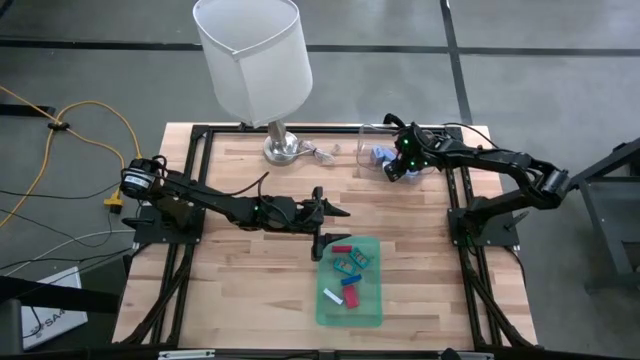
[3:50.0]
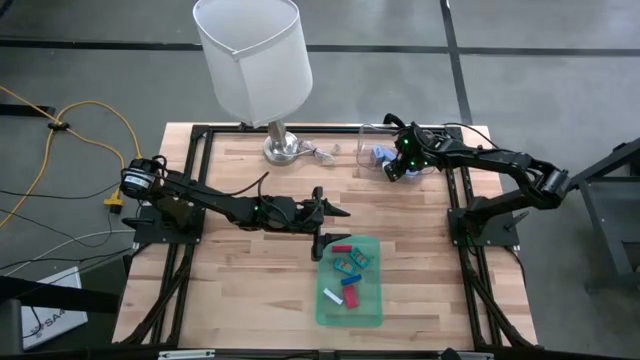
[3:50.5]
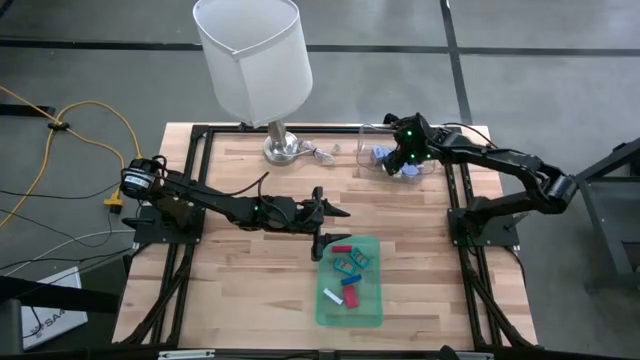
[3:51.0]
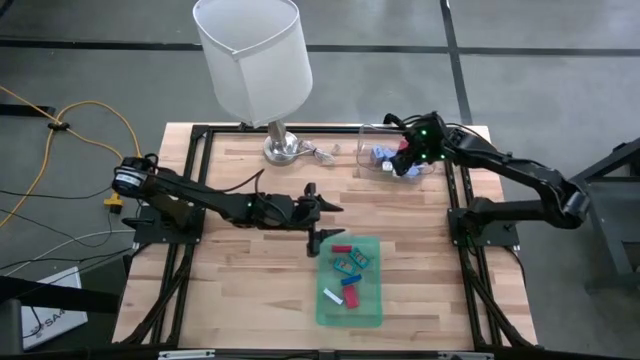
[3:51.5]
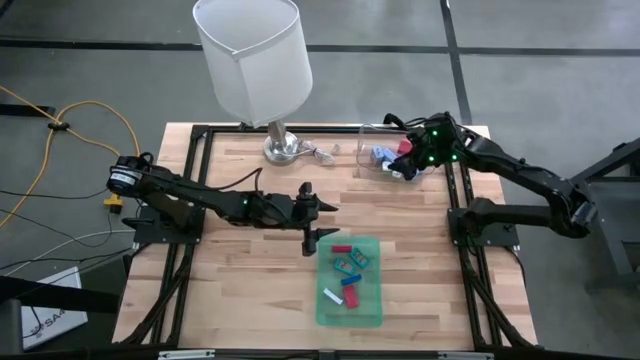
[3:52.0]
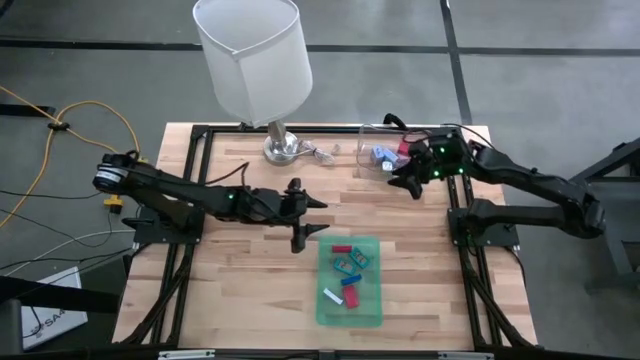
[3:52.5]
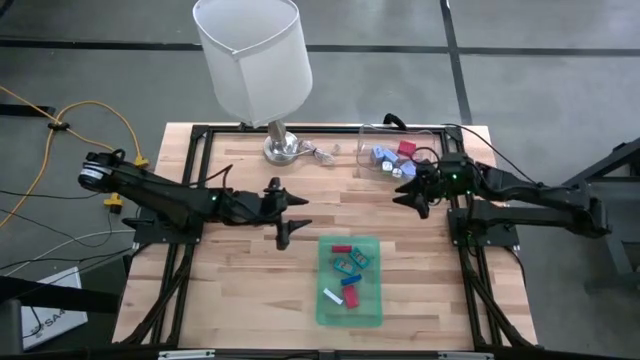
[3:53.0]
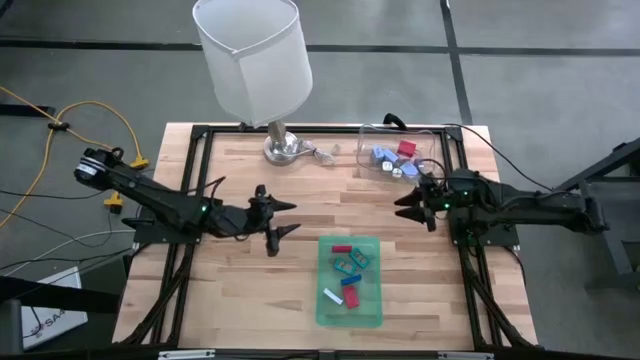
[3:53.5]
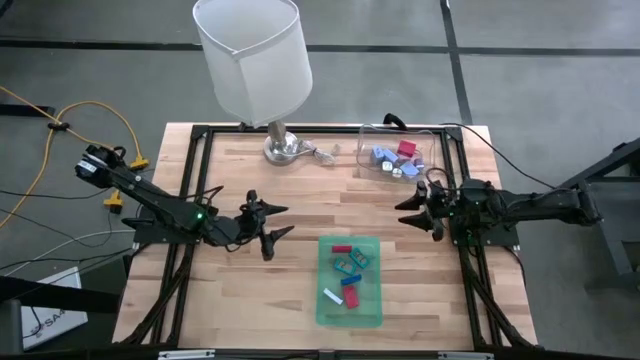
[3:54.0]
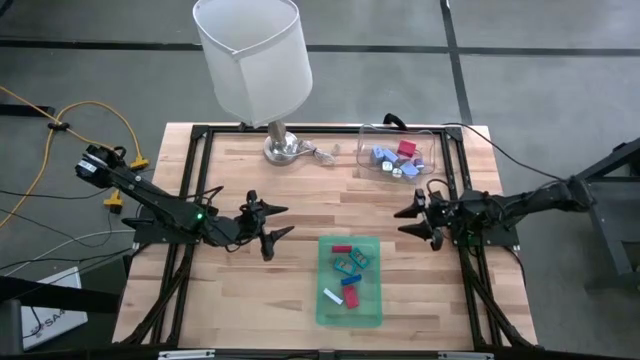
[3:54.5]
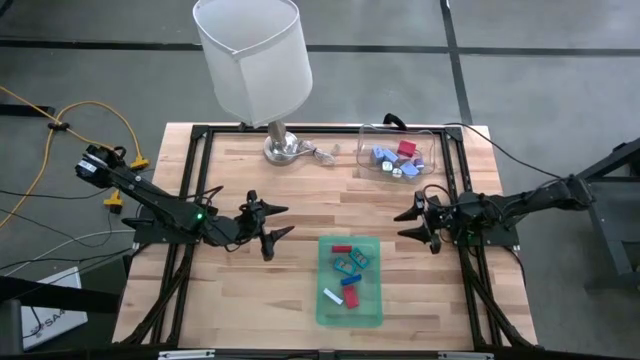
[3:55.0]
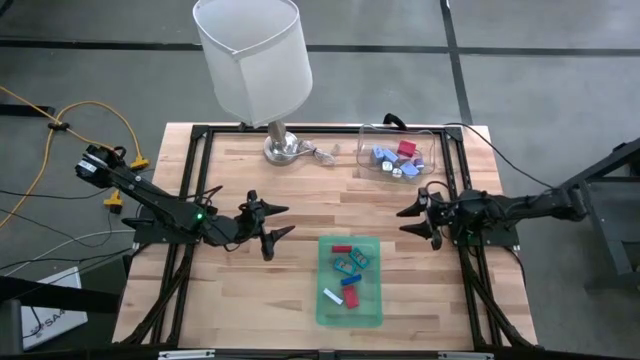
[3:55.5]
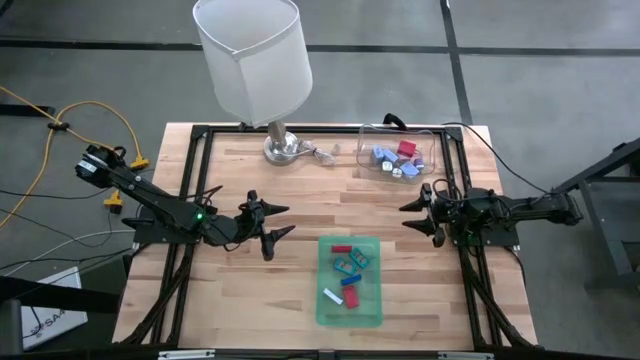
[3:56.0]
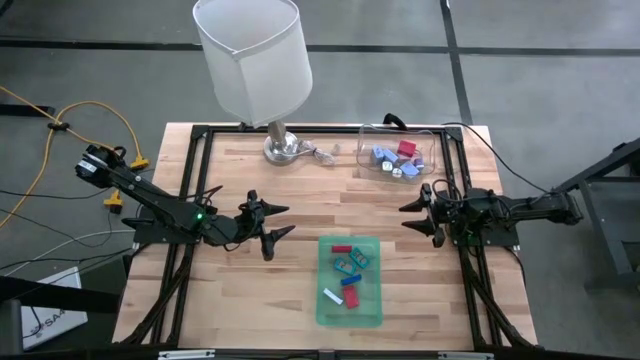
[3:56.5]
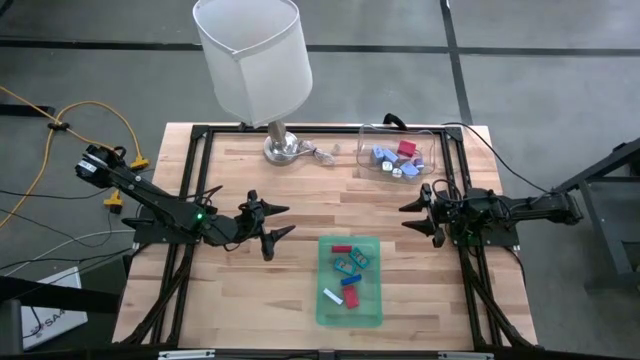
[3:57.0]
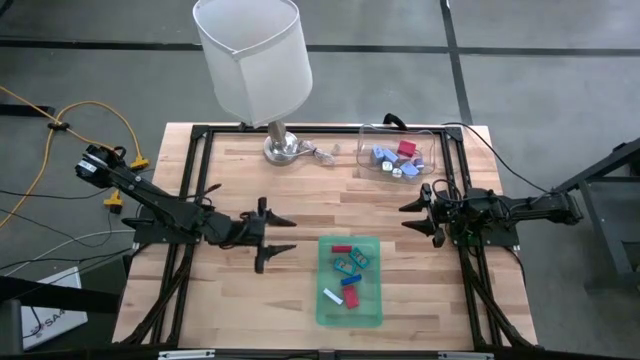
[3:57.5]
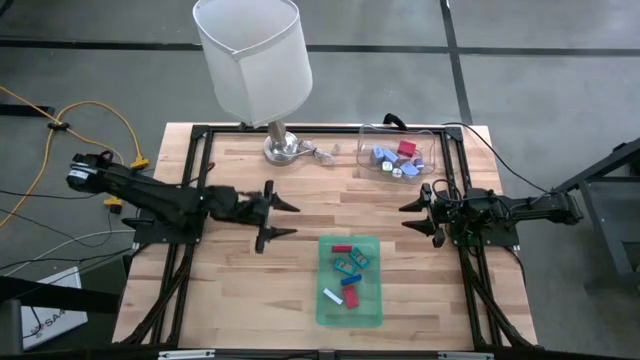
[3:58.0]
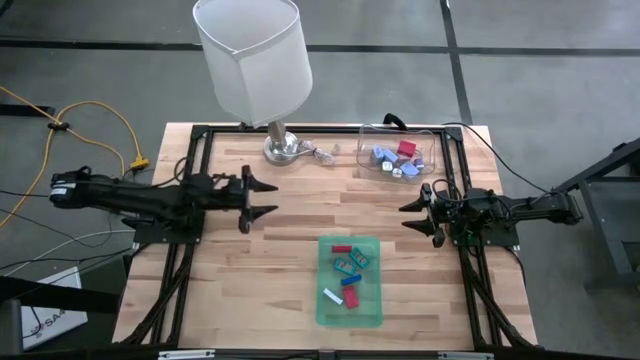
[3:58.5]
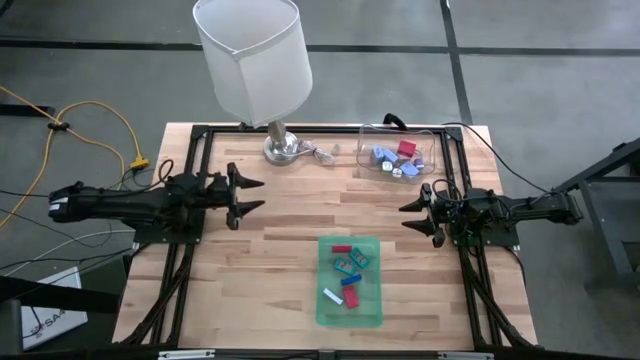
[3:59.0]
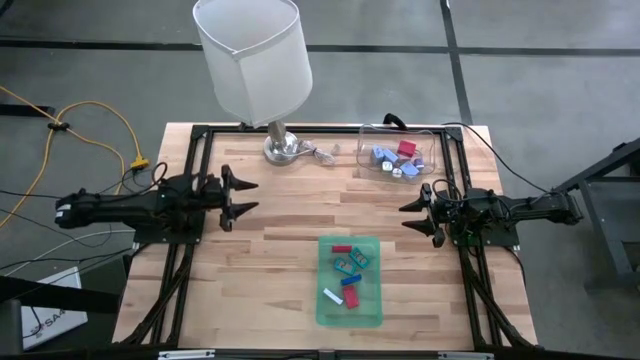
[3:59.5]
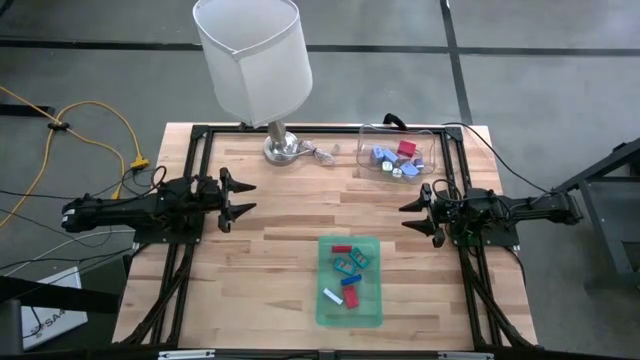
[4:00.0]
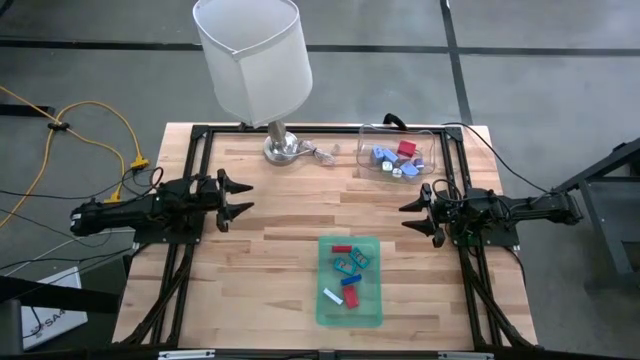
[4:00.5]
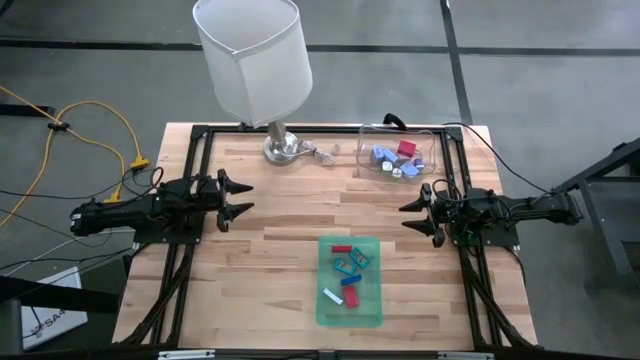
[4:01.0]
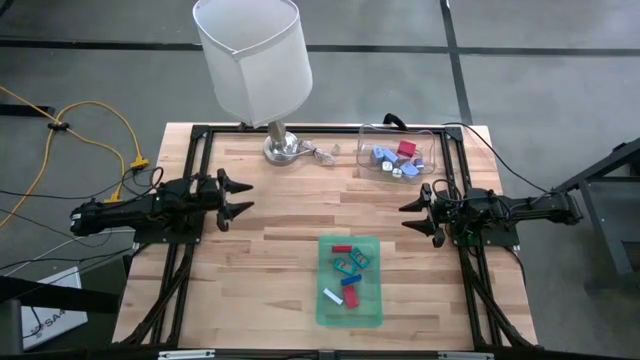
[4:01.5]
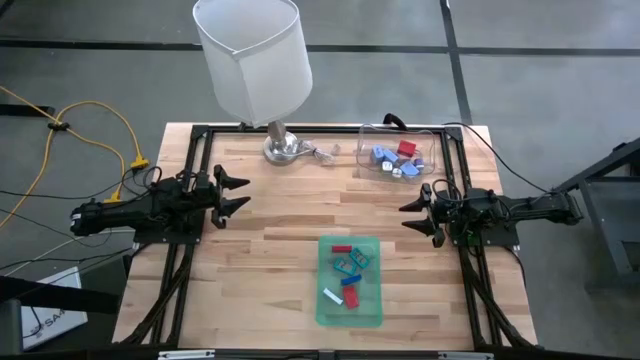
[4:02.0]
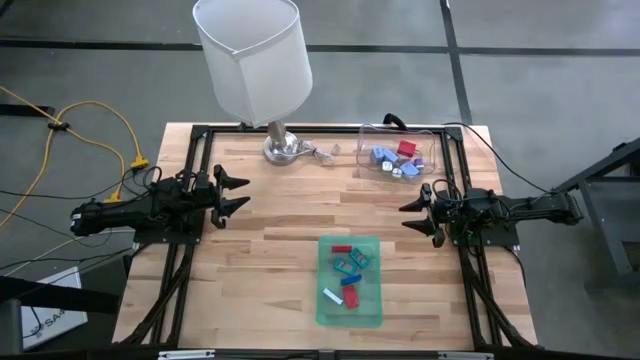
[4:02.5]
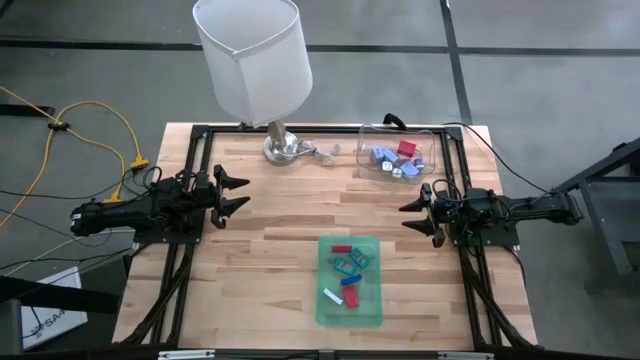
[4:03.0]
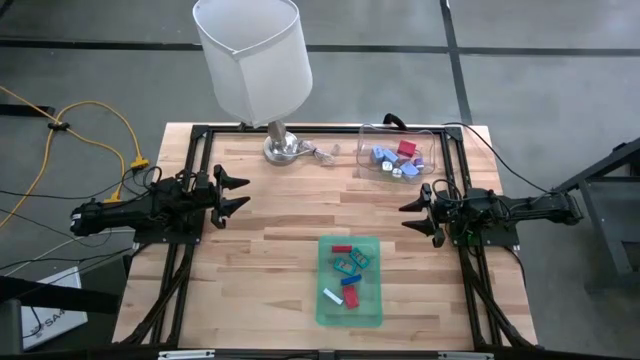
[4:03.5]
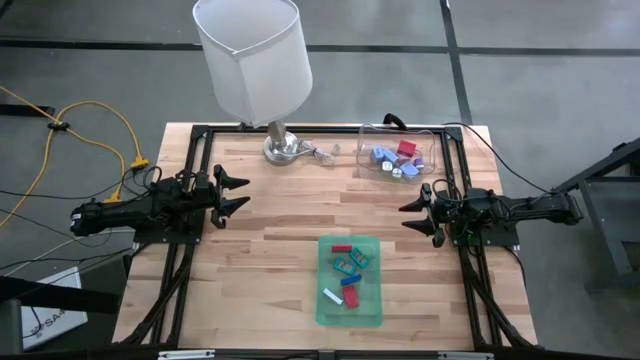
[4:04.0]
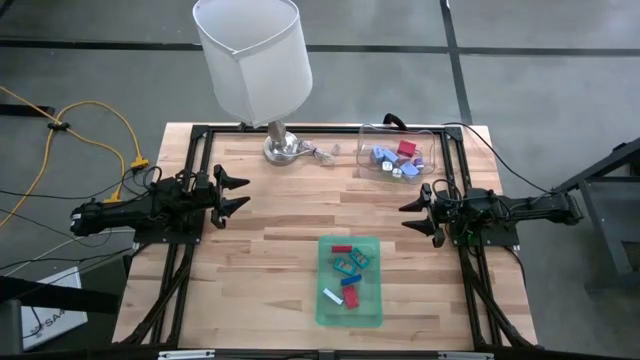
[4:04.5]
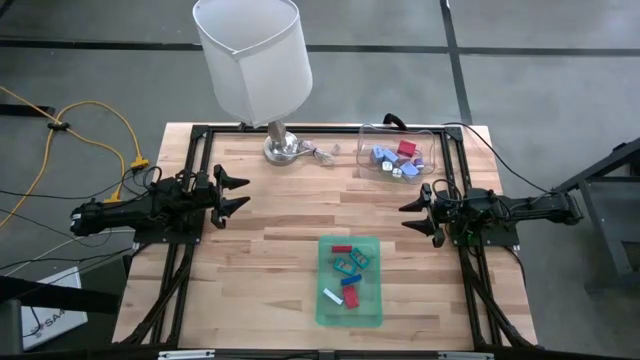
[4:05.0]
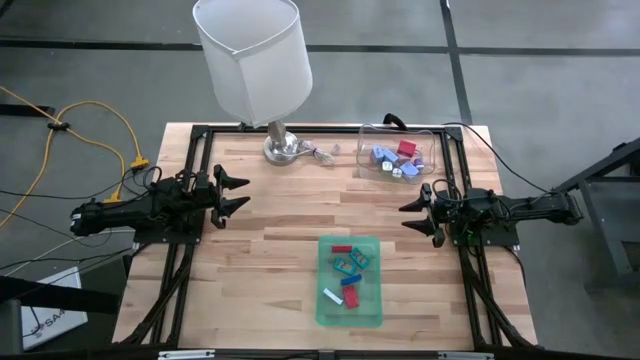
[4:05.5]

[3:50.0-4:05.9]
Task: Pick & Place Office items
Return to Home Position

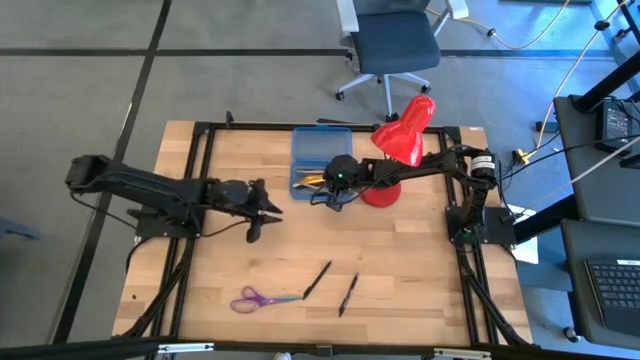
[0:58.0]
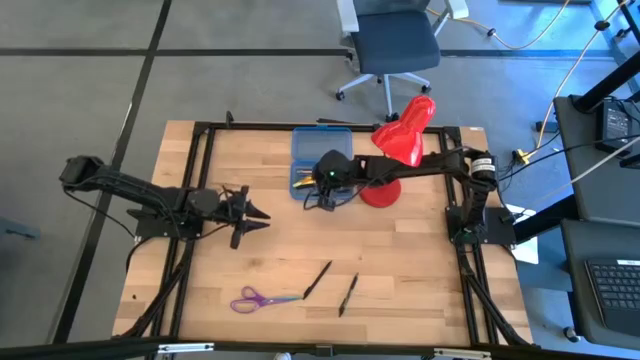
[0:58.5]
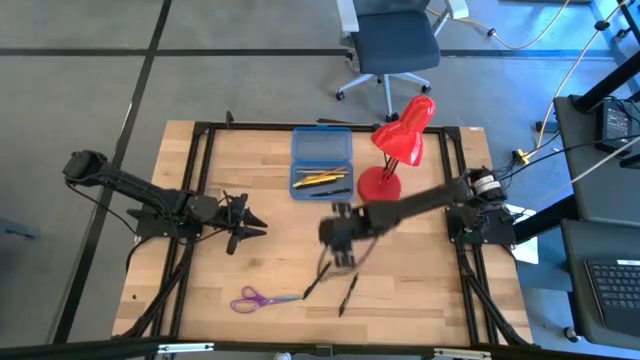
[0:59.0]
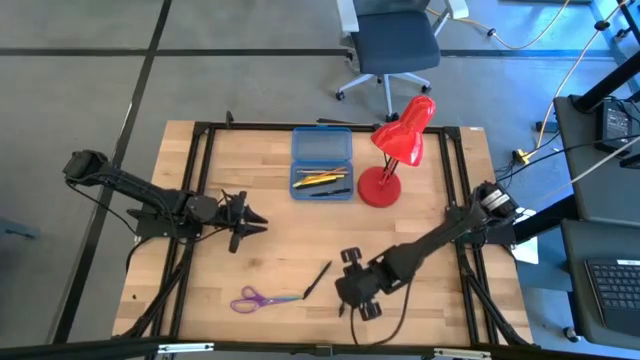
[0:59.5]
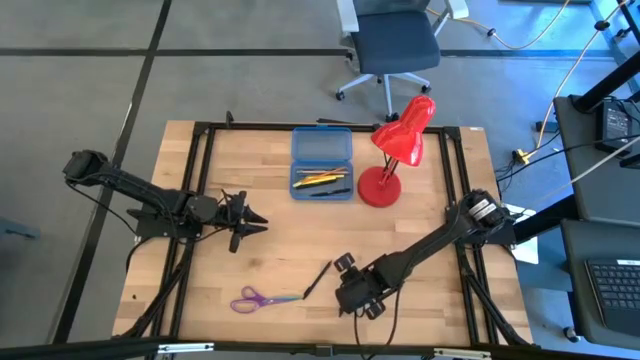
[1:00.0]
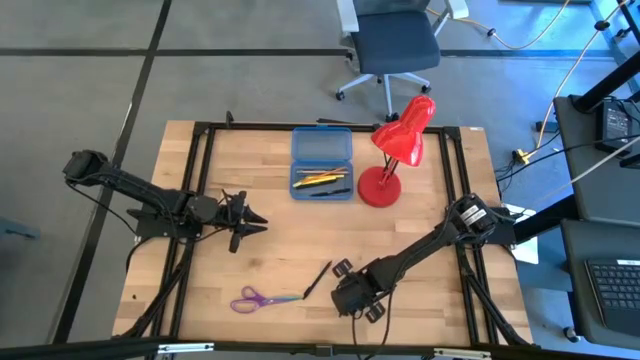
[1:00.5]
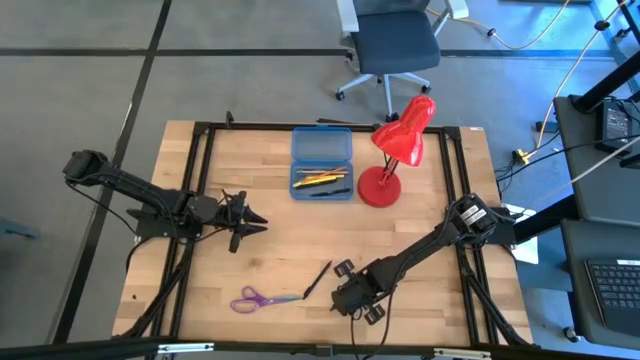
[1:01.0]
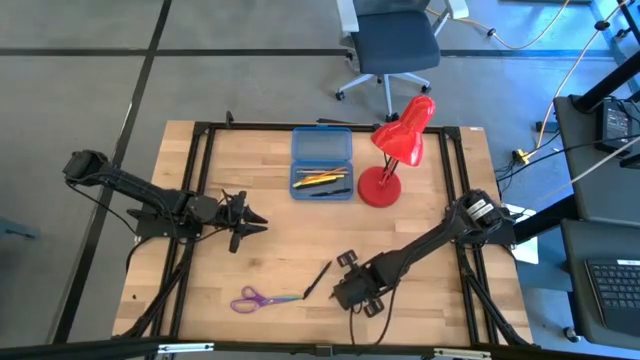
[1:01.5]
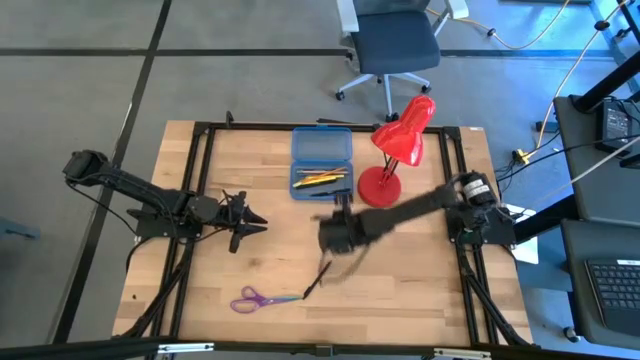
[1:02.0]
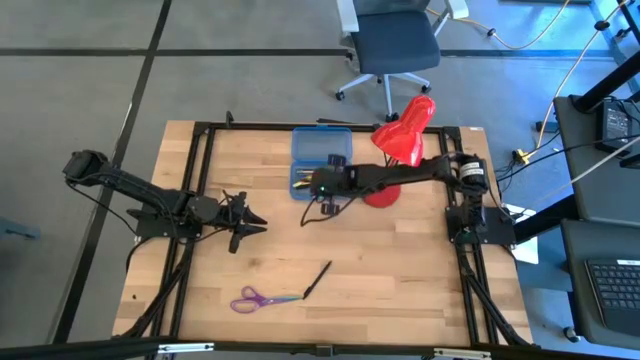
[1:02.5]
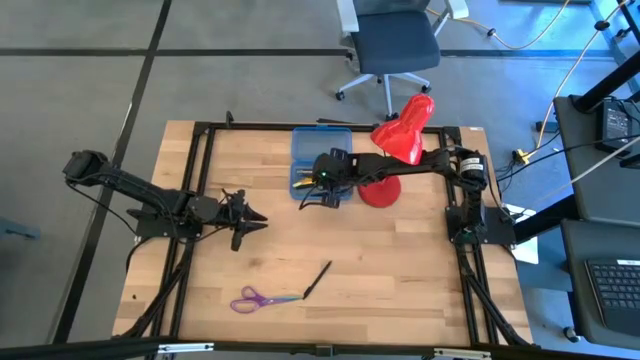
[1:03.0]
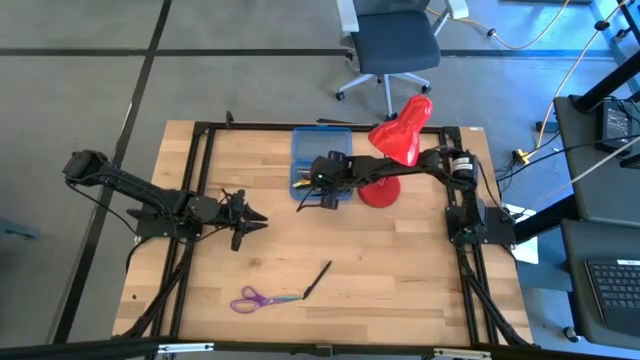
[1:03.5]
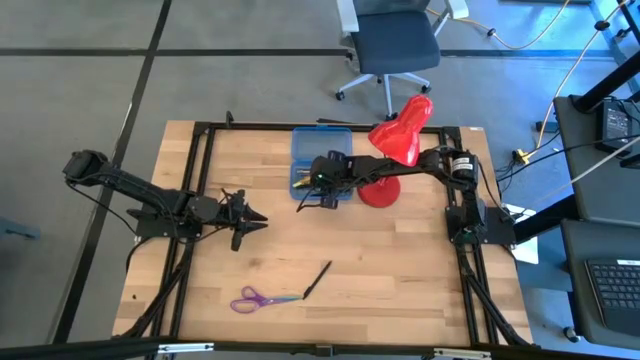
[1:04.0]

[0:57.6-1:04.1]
Task: Pick & place school supplies into a supply box
Put the black pen into the blue supply box
